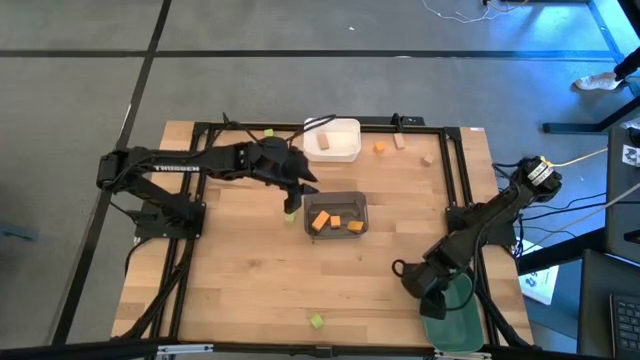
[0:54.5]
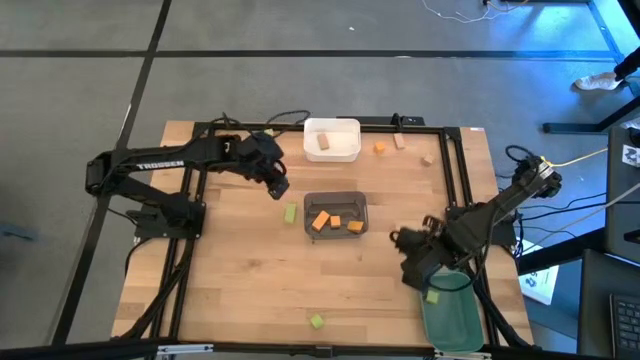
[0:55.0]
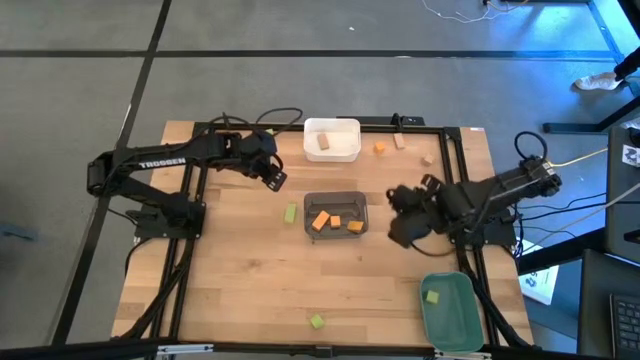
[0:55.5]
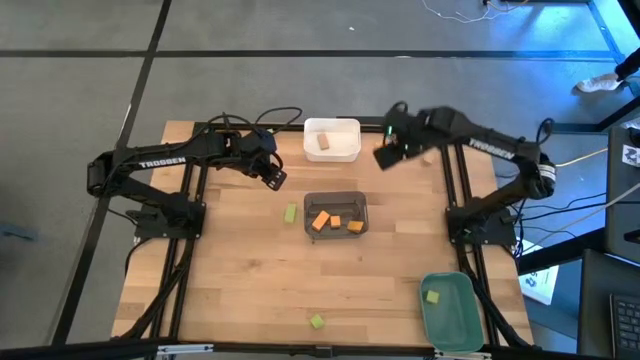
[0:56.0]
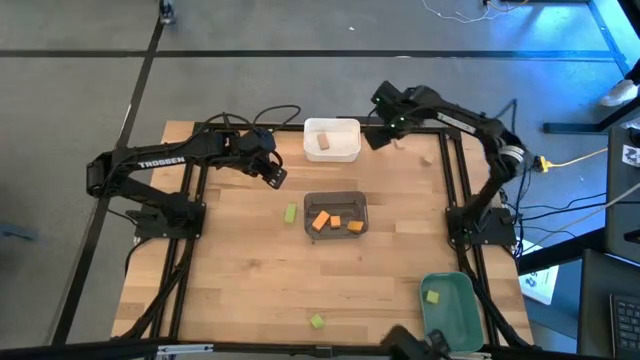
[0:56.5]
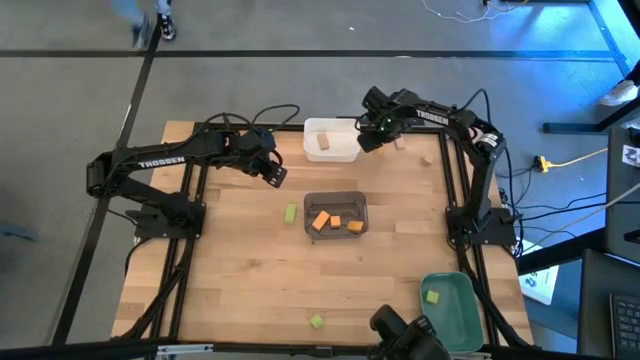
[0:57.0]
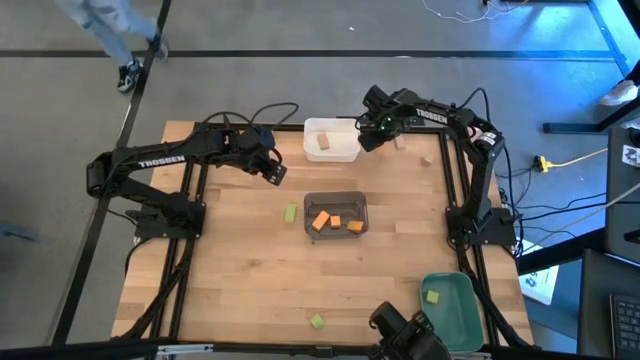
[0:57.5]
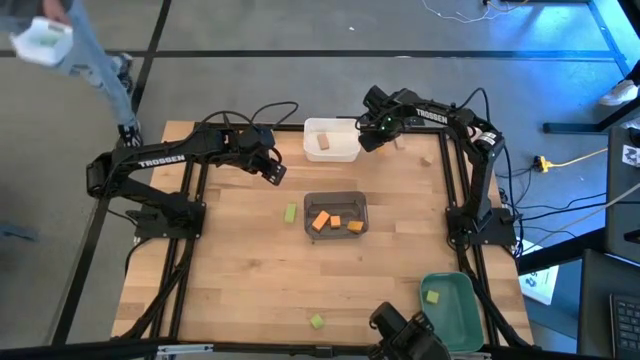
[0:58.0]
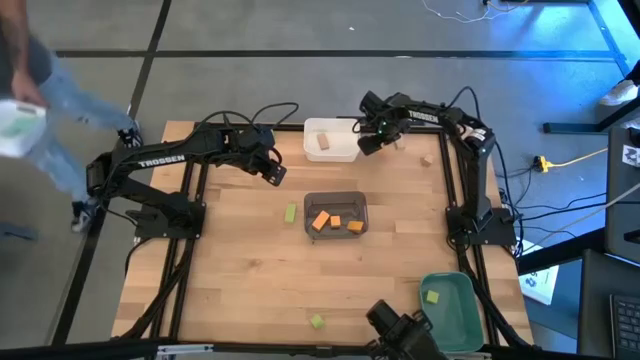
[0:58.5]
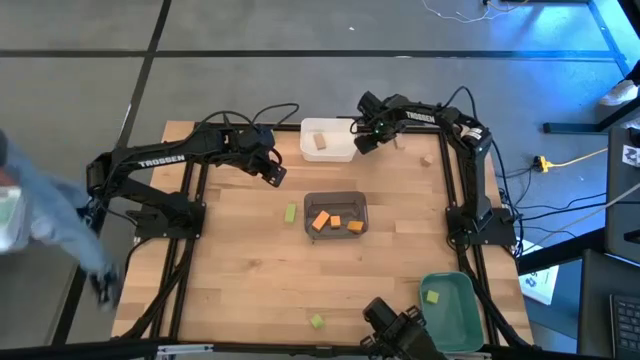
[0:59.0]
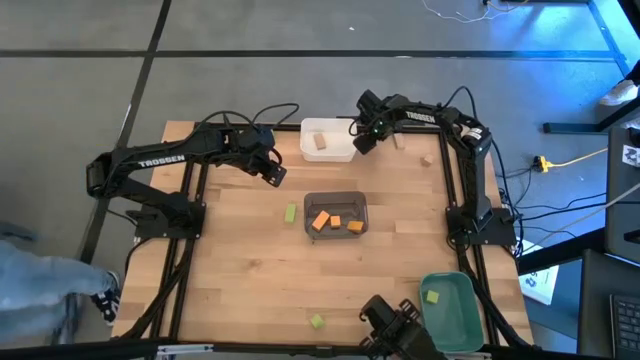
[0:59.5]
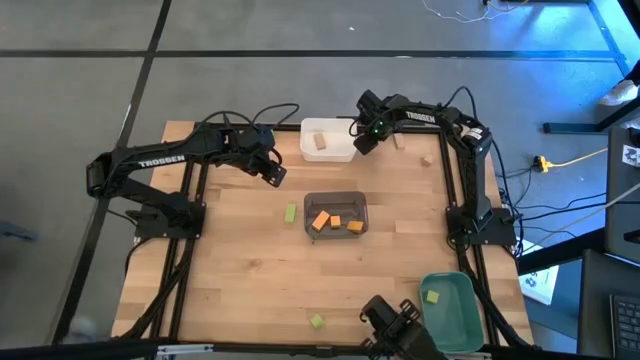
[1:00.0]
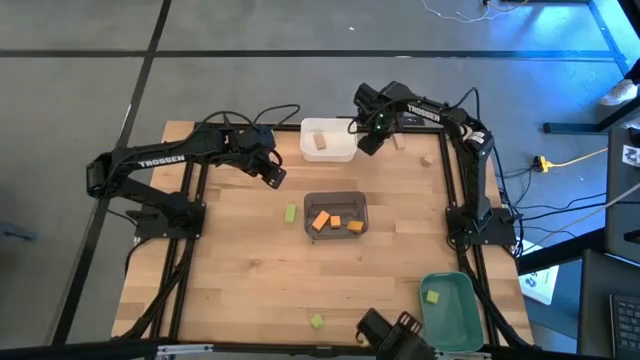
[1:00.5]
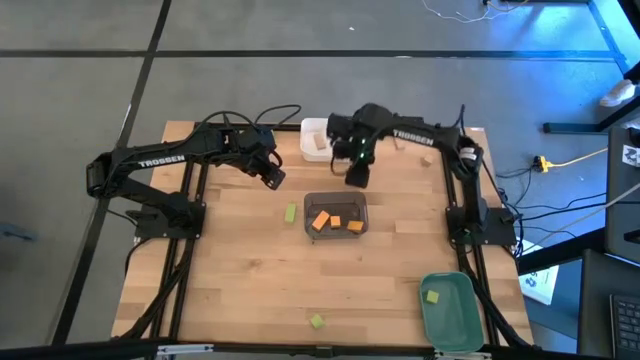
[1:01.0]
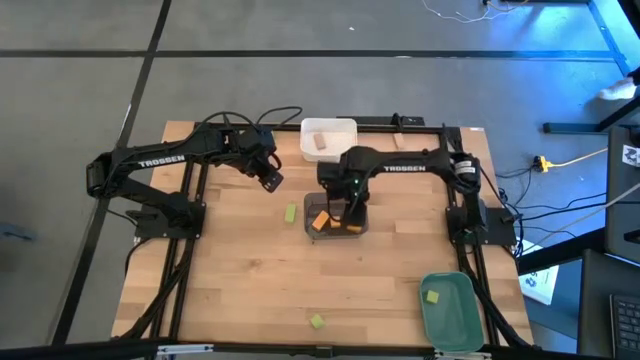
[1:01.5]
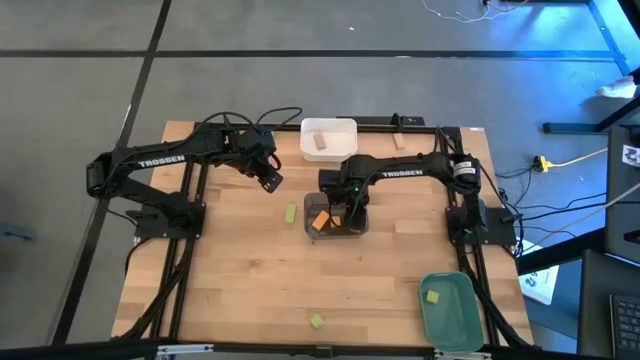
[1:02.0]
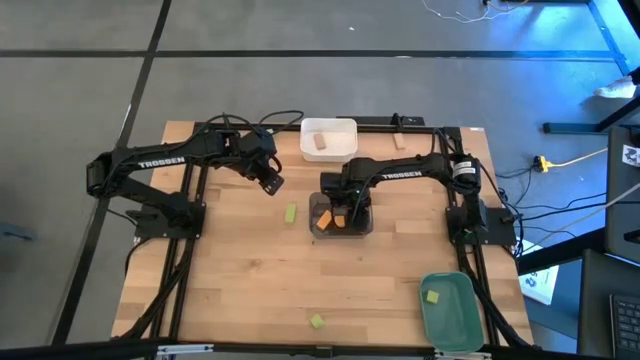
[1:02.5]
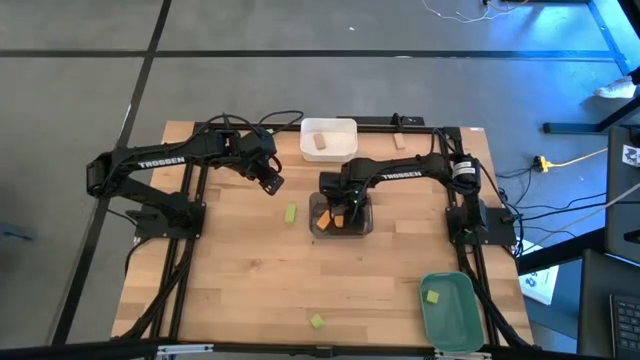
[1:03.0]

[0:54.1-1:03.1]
Task: Sort & place blocks by color
Put the orange block into the black bin

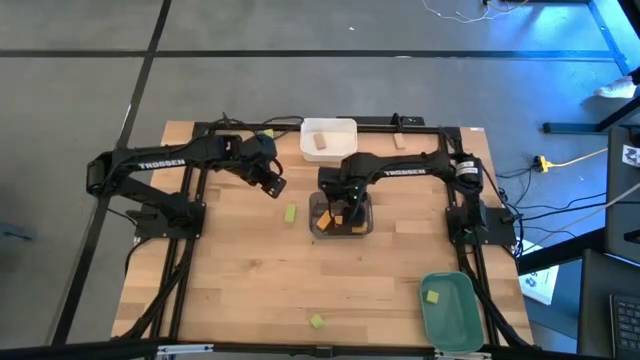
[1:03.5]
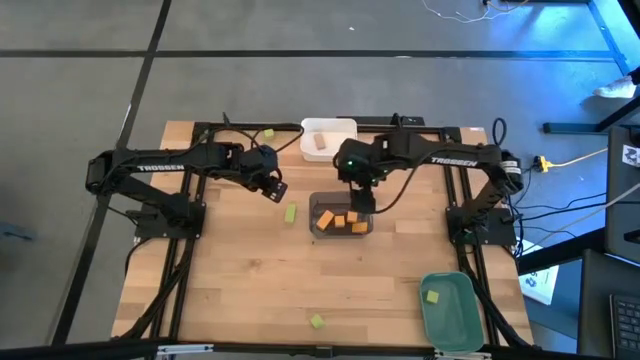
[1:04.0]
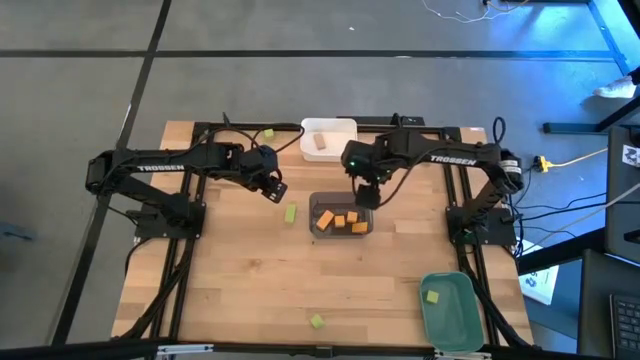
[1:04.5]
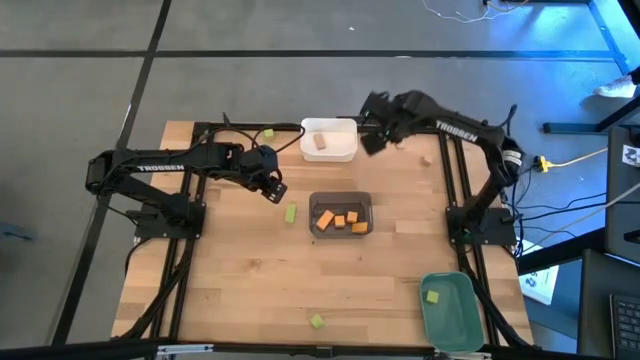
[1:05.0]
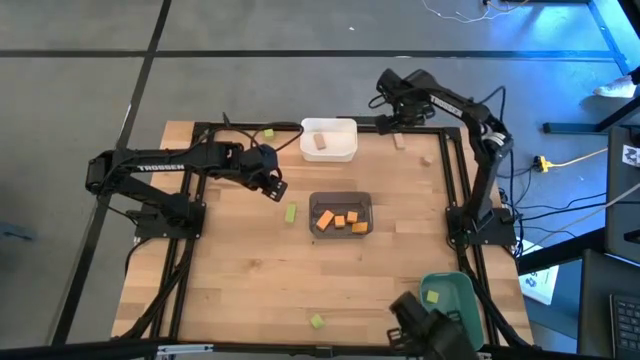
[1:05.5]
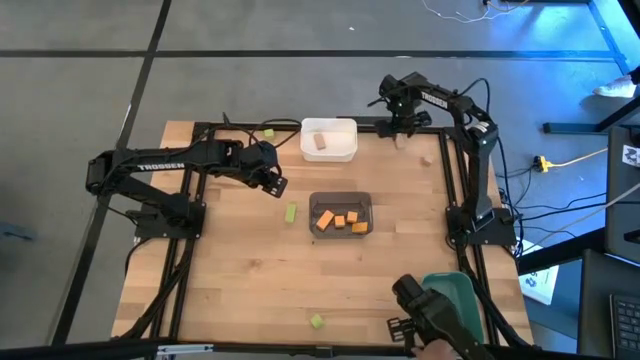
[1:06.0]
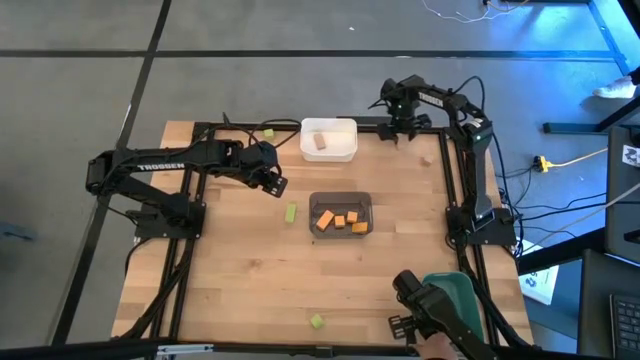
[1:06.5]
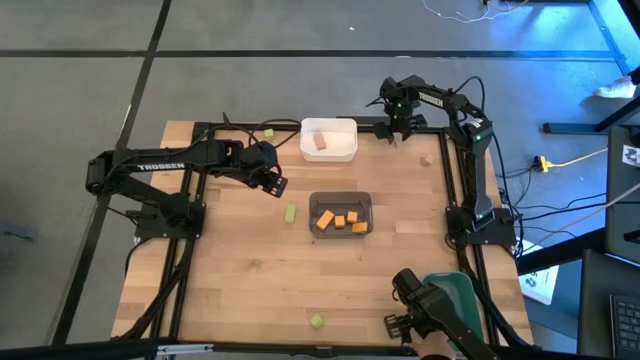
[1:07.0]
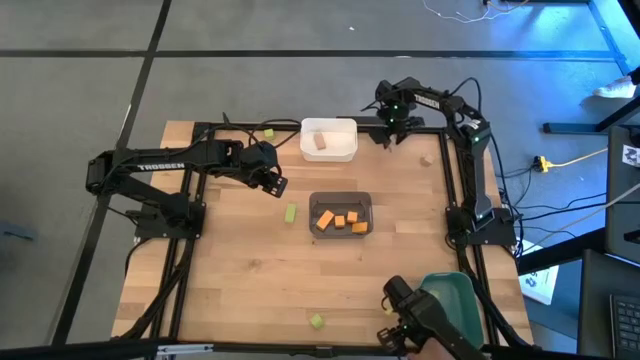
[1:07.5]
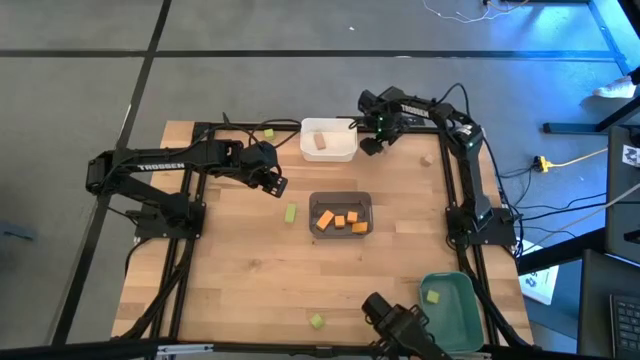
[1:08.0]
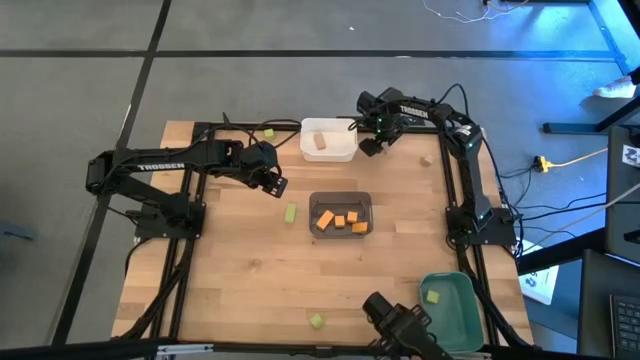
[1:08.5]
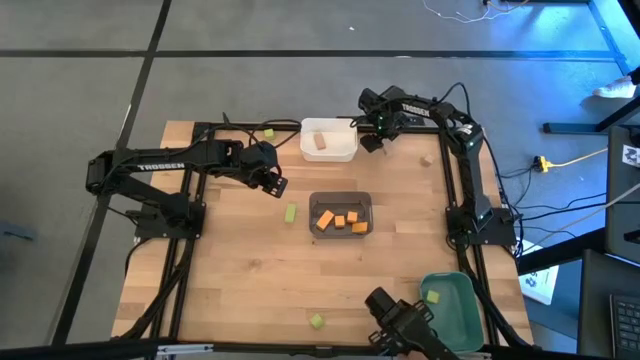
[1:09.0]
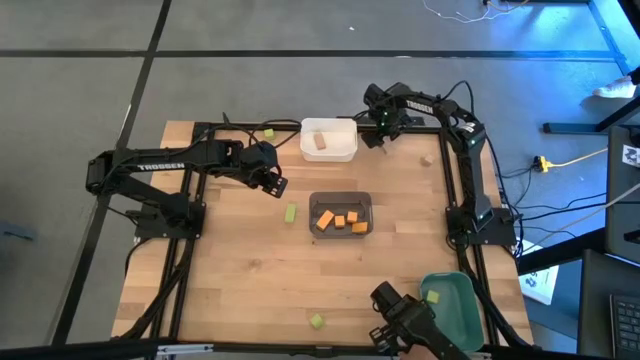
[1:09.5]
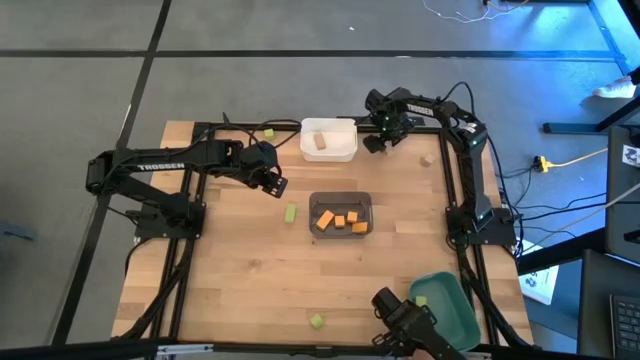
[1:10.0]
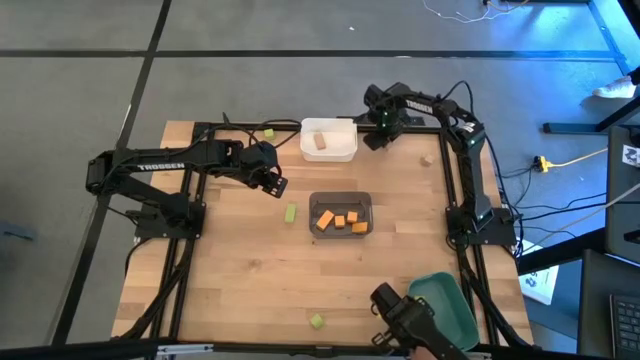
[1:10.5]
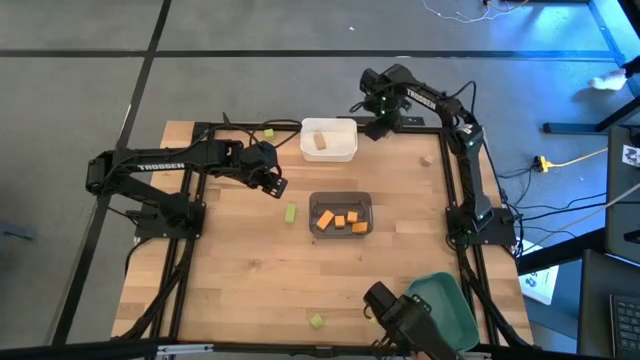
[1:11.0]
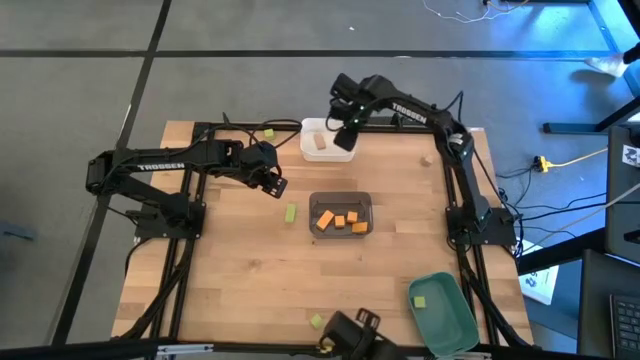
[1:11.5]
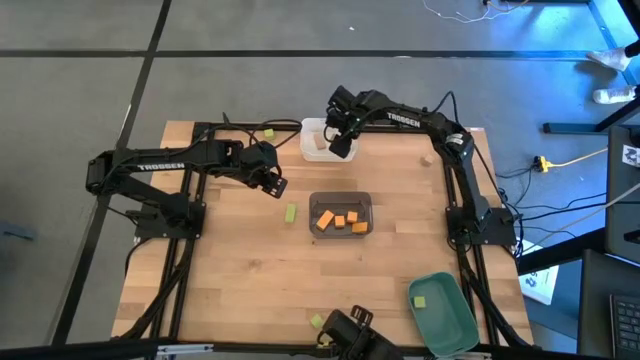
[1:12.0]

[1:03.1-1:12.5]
Put the brown block into the white bin

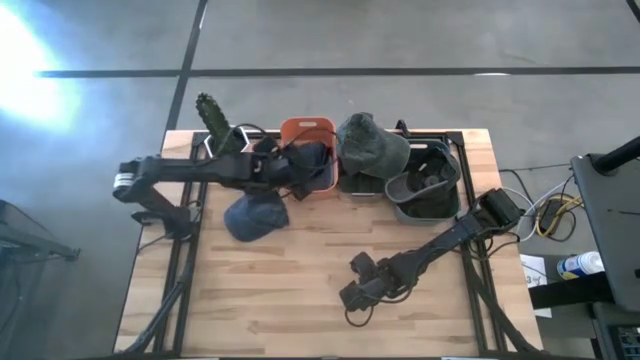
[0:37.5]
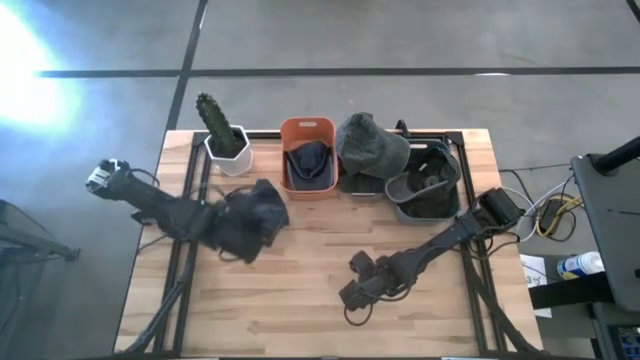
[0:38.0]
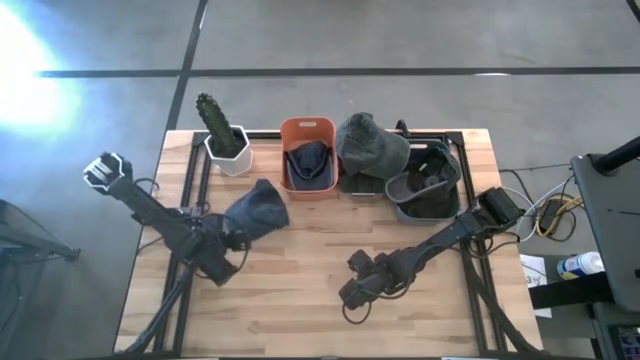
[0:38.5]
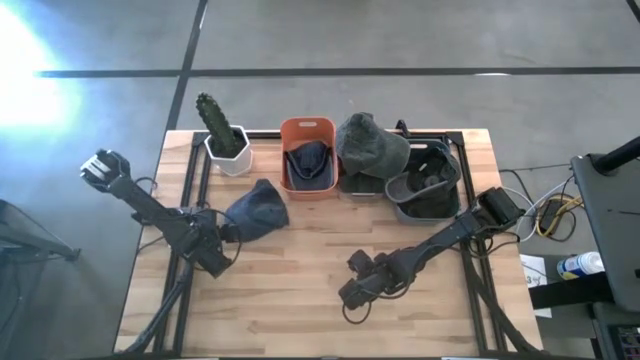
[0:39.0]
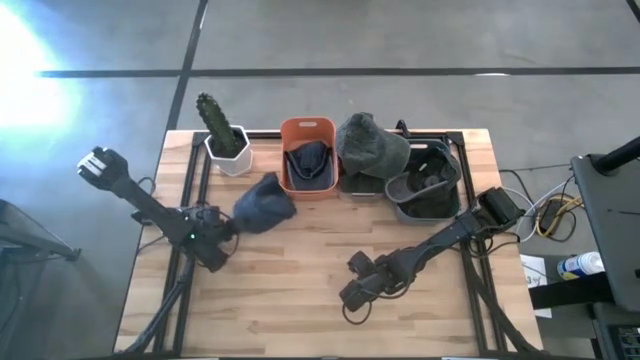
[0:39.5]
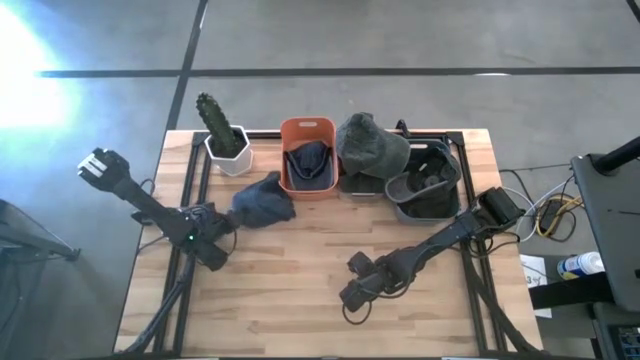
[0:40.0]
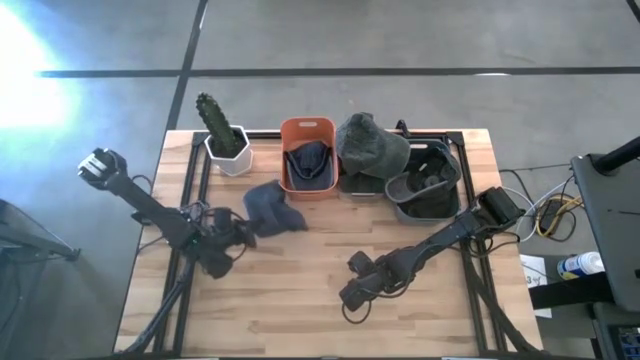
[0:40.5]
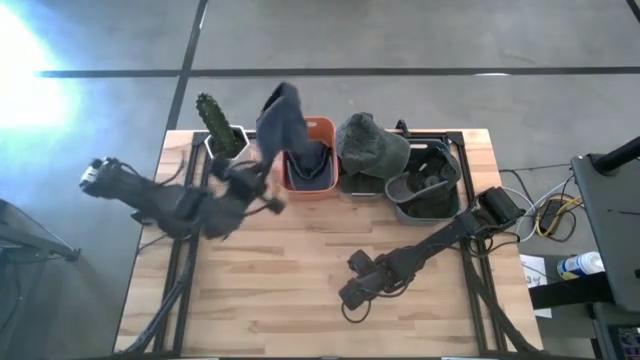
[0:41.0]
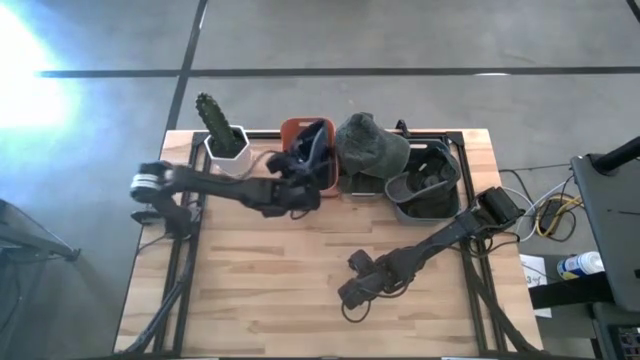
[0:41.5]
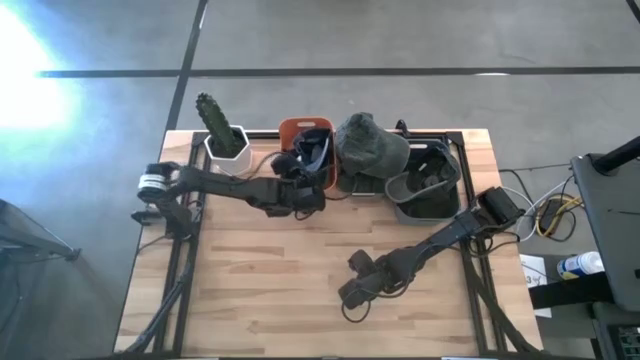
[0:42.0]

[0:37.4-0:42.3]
Task: Pick & Place hat
Put the blue cap into the orange bin
